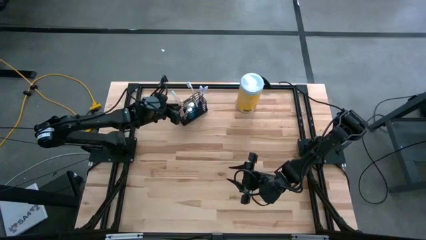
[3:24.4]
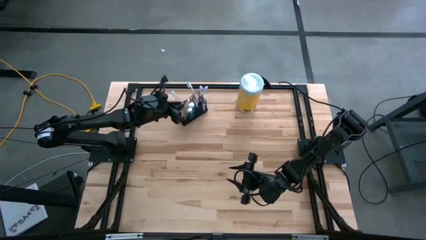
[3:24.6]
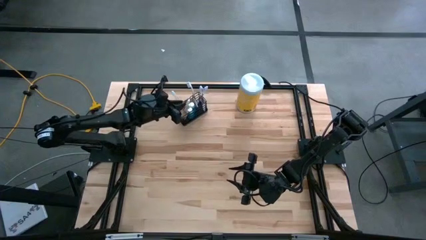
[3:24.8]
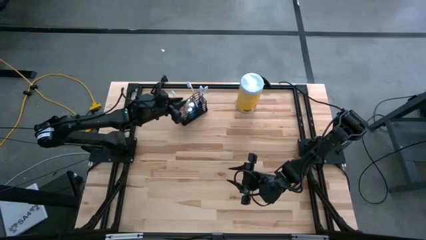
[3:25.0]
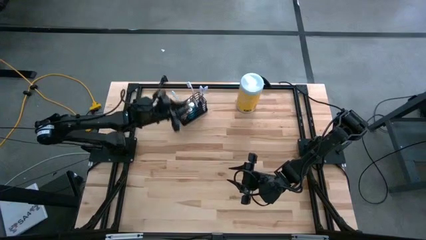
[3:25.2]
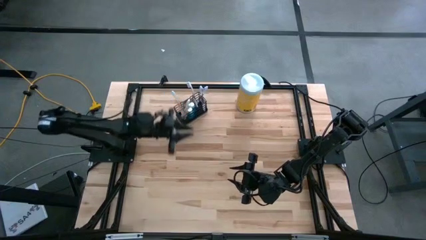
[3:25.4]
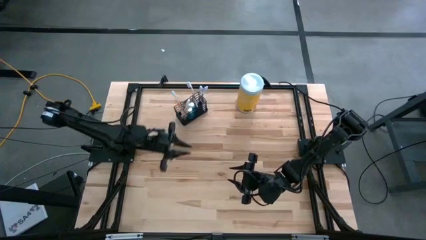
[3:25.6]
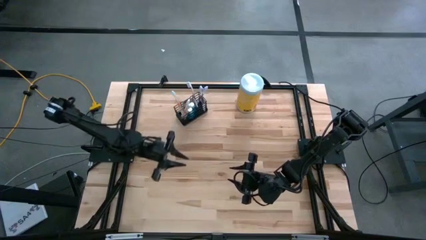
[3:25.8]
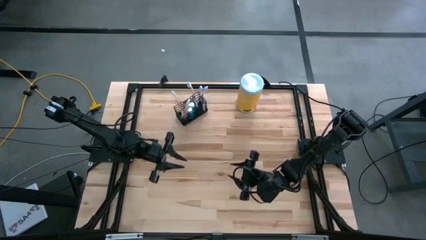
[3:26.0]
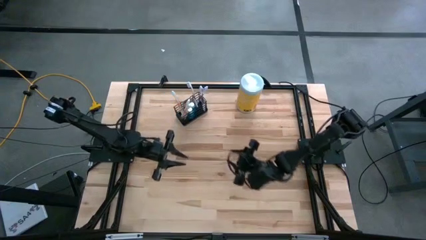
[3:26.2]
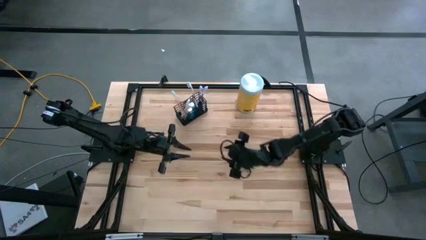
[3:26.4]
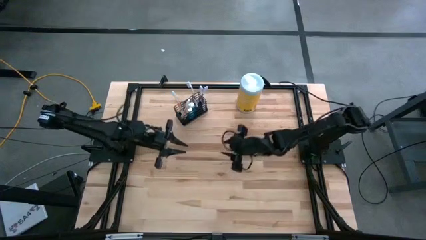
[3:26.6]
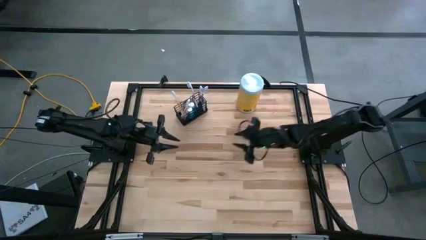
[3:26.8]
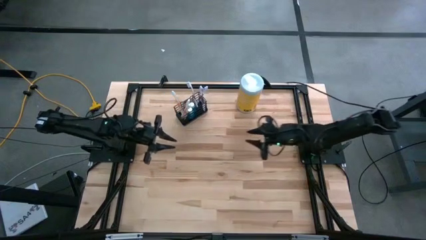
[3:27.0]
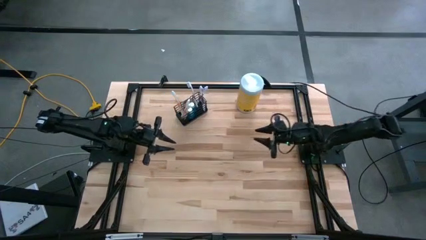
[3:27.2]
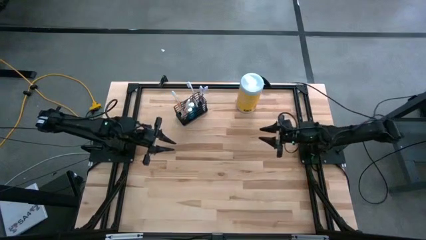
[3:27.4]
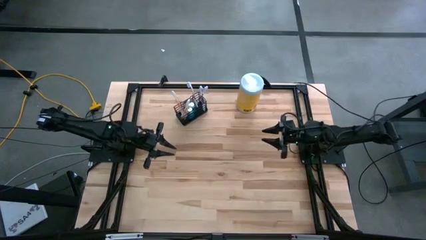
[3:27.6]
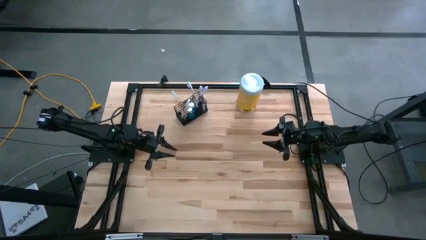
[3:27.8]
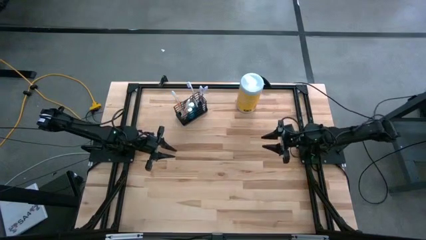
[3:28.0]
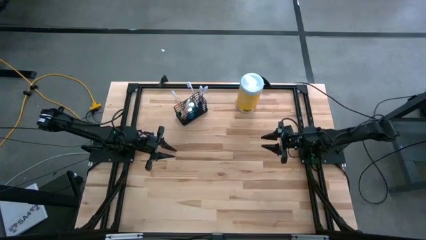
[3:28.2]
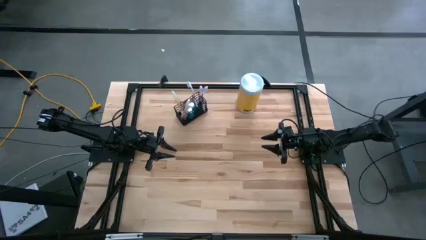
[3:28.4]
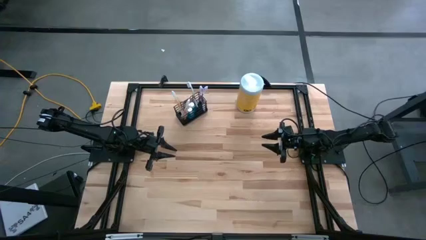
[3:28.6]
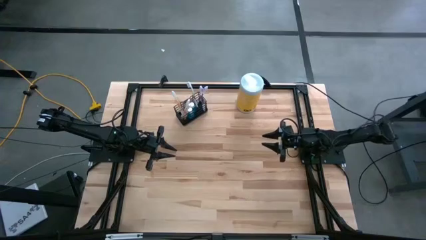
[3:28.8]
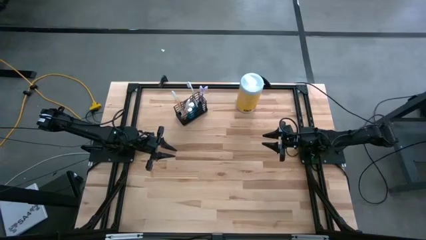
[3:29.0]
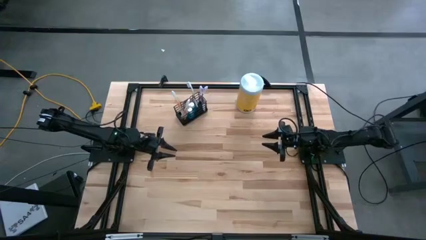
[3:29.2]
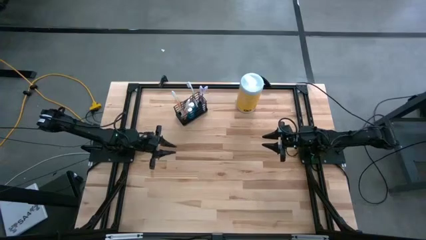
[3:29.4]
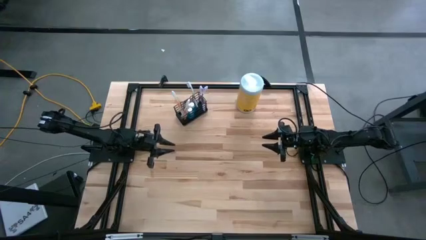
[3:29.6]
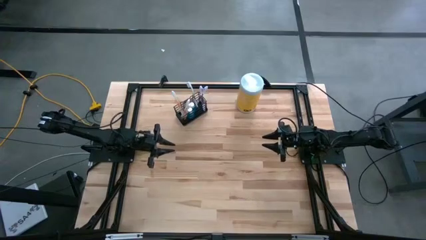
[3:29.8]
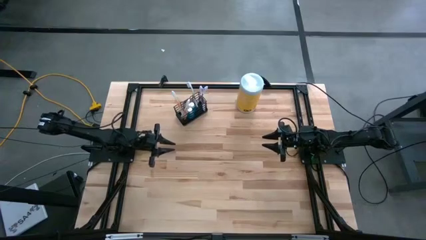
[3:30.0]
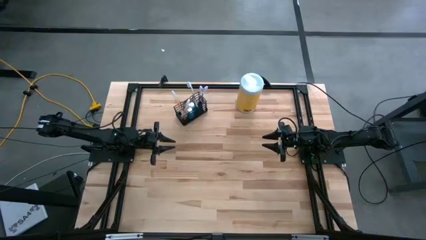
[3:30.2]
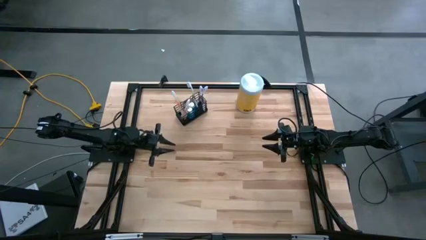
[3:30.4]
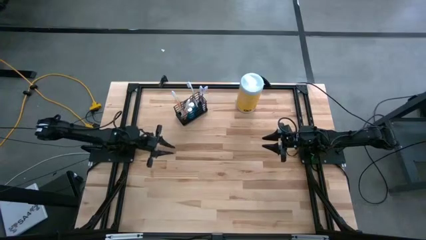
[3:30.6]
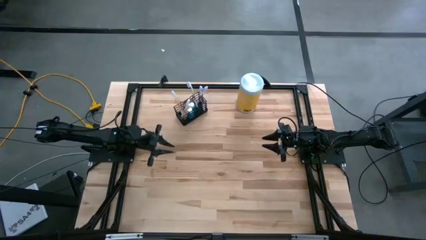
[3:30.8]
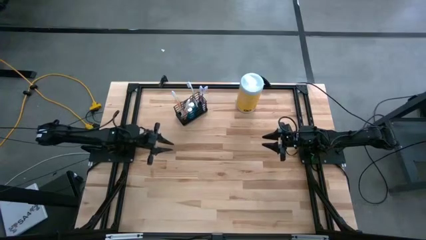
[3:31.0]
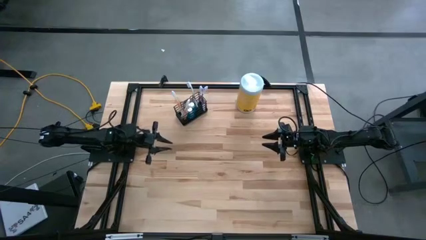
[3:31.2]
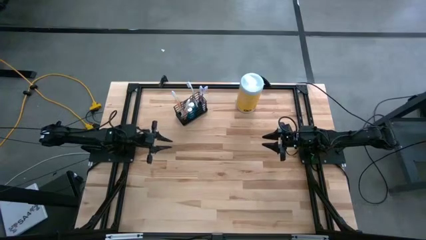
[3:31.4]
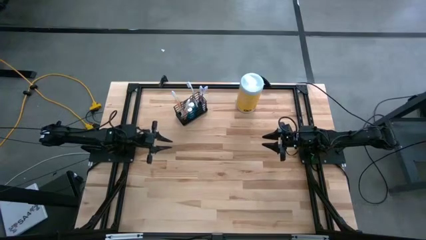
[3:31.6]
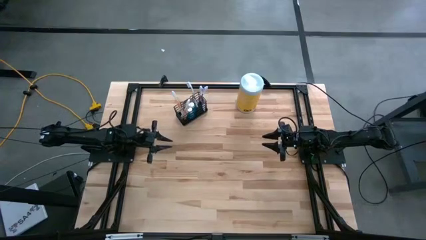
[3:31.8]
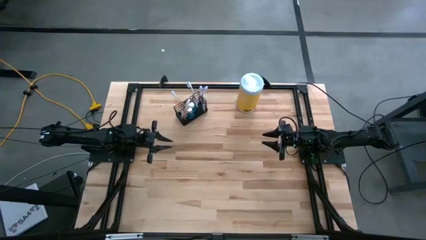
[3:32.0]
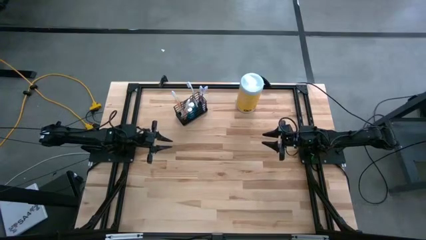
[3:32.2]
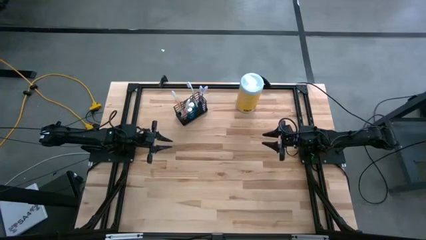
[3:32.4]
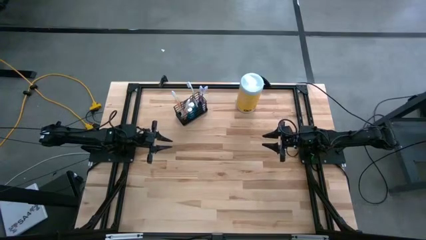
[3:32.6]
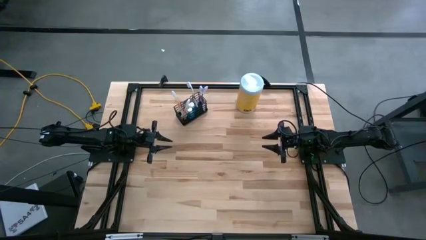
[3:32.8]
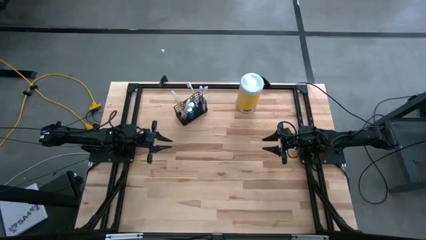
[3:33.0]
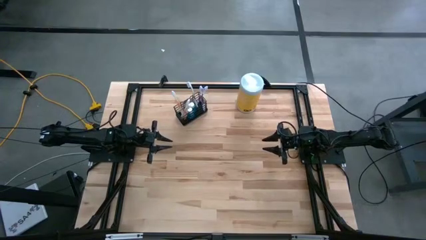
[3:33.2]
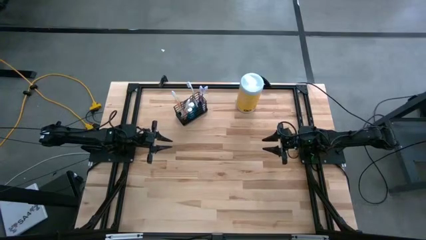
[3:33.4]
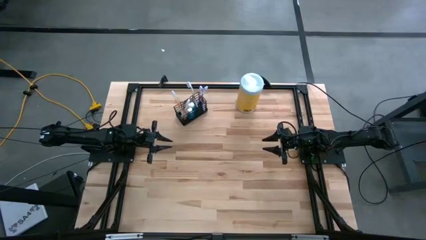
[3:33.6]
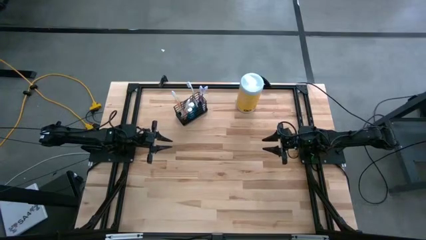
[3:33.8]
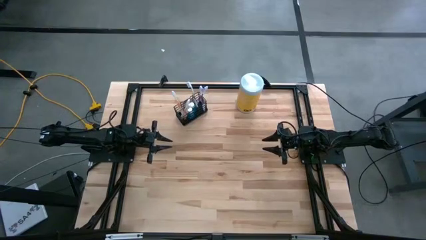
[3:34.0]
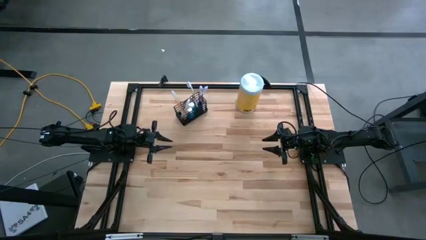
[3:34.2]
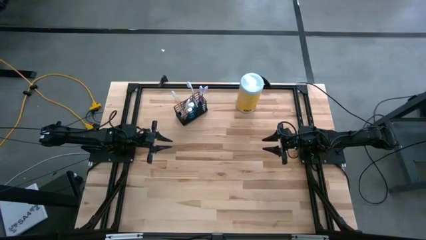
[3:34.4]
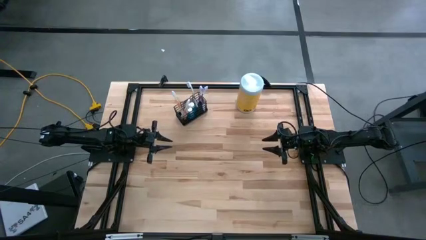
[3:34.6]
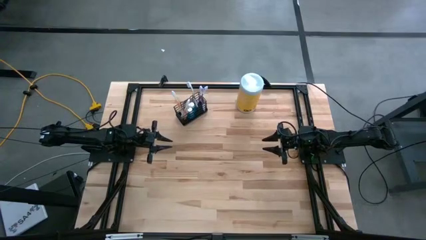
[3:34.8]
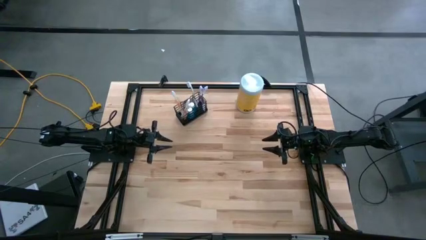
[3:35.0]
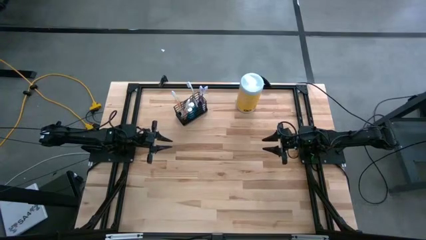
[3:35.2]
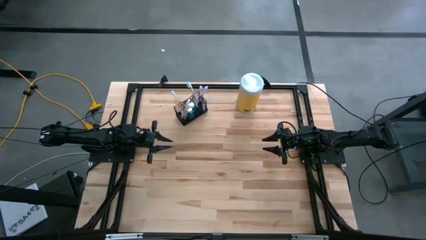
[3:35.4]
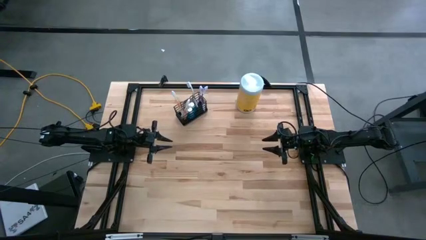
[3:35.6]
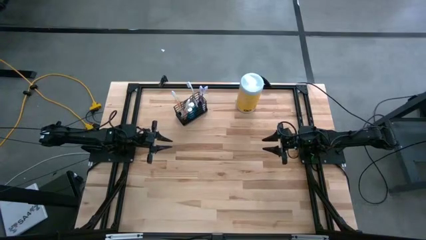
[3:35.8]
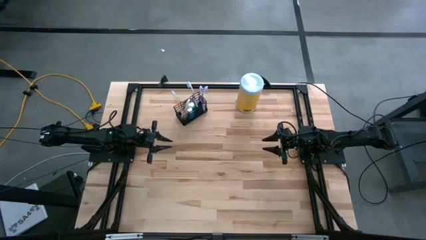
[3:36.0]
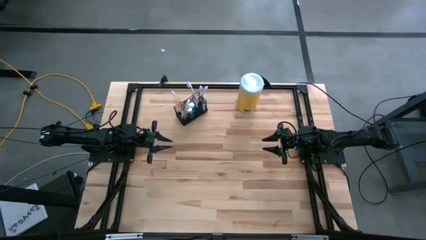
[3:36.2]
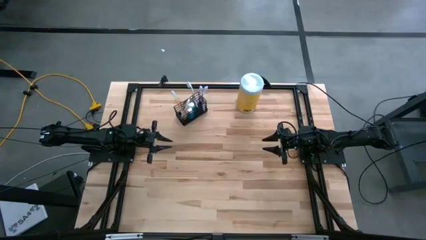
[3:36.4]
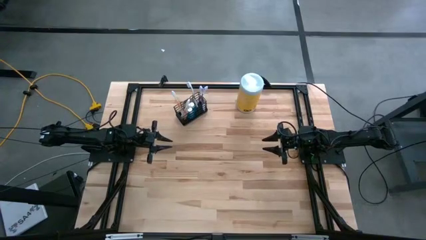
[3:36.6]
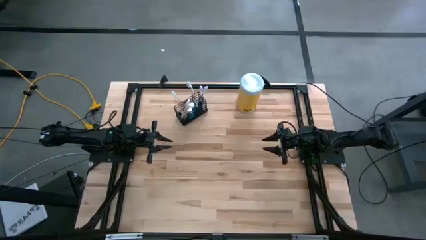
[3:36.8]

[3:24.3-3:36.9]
Task: Pick & Place toothbrushing station
Return to Home Position

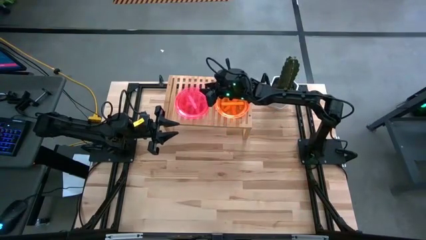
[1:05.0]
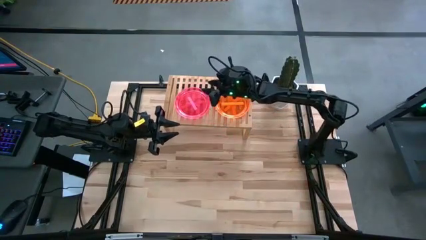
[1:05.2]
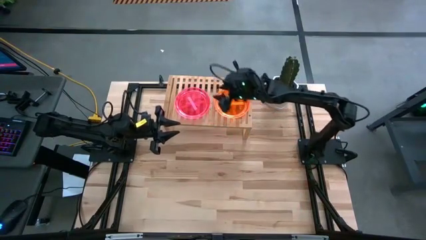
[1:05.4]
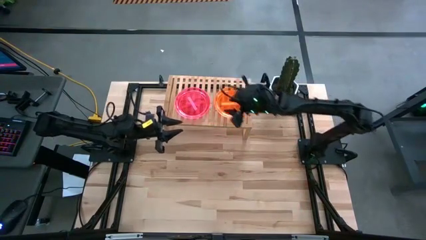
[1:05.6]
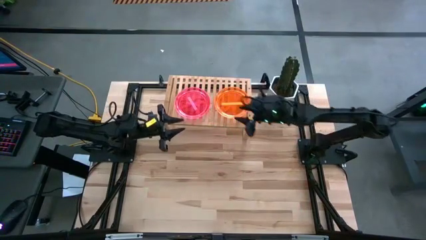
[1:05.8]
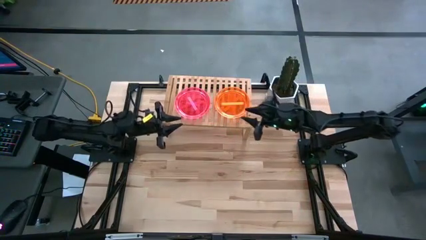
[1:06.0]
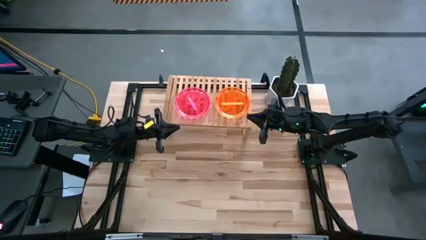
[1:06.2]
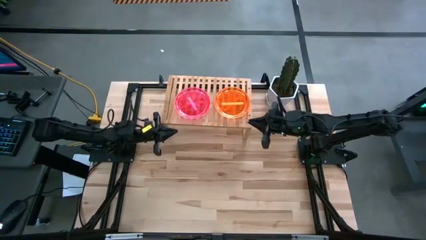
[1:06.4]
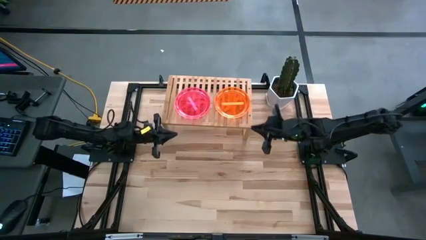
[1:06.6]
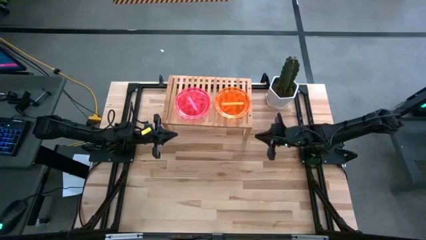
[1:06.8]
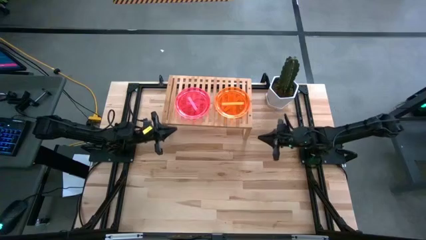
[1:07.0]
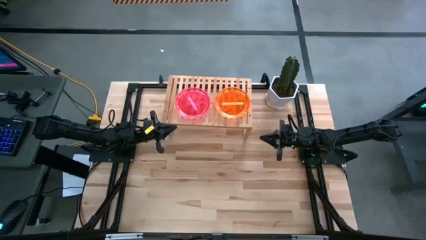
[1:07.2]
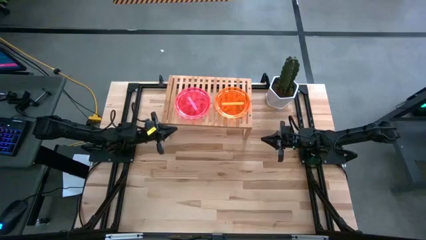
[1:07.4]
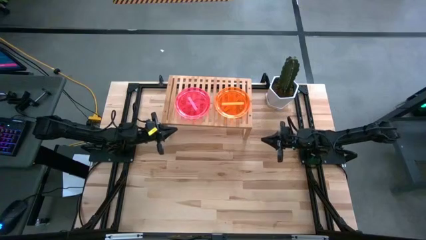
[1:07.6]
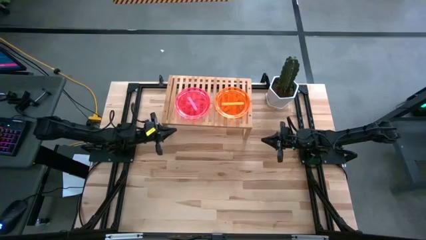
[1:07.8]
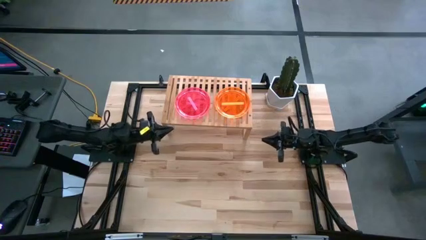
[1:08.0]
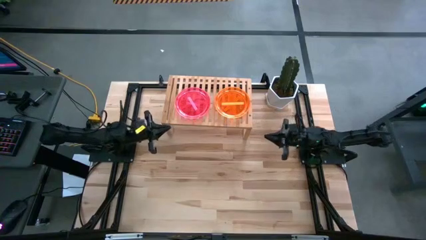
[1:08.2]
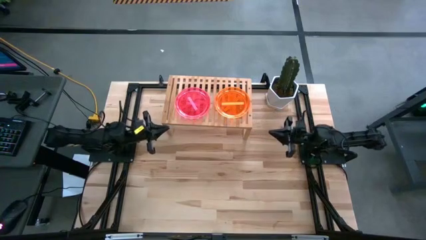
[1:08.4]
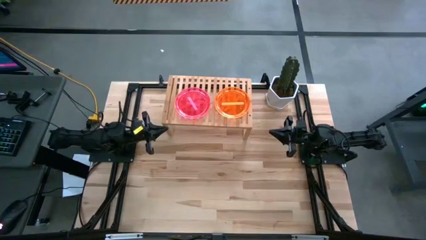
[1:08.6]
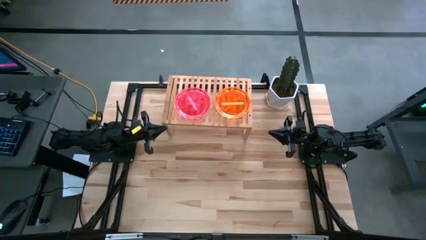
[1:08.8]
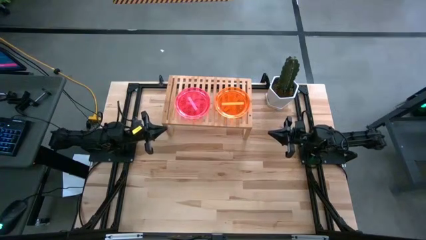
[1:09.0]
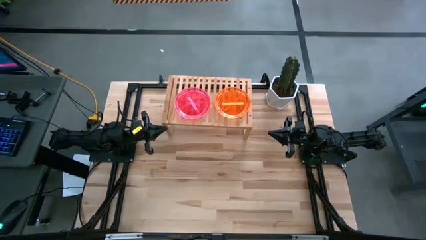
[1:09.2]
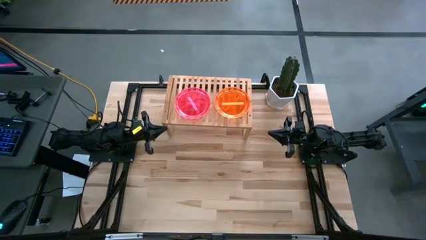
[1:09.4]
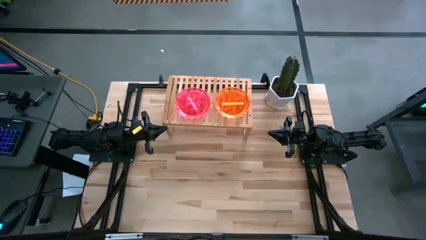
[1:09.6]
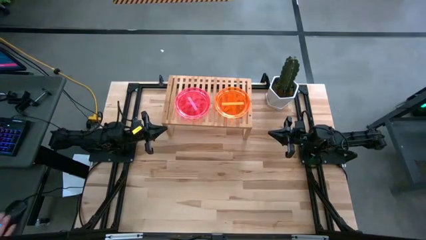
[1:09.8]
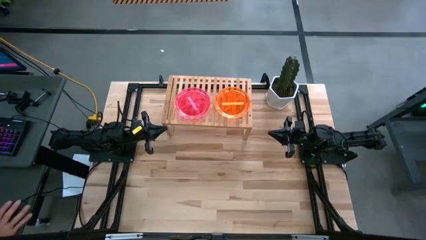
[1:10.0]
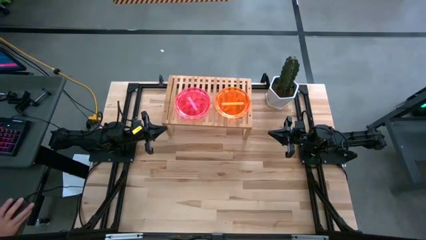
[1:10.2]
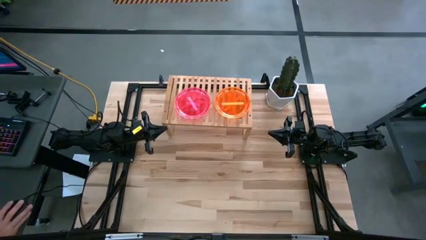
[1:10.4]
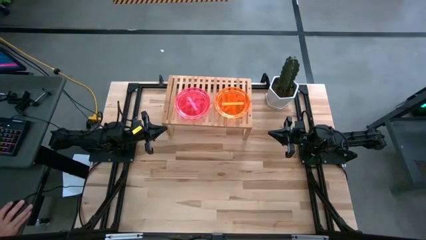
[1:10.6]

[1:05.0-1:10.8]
Task: Place and stack plates onto a shelf
Return to Home Position
